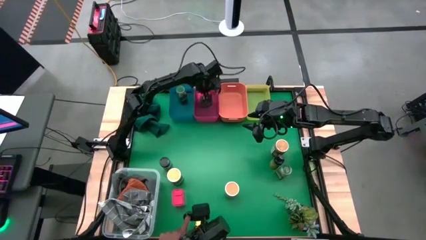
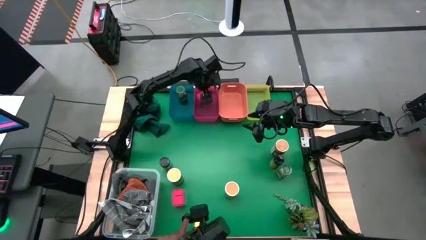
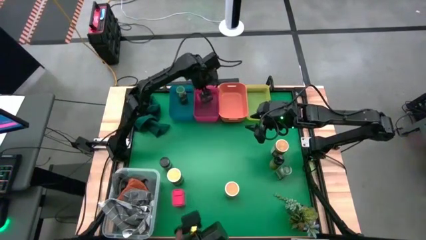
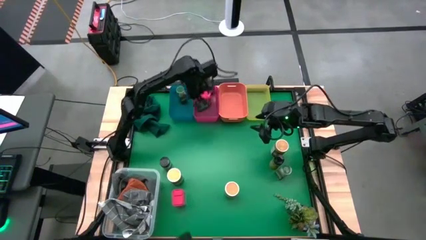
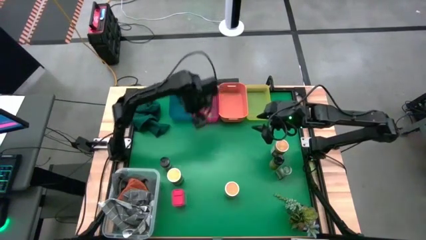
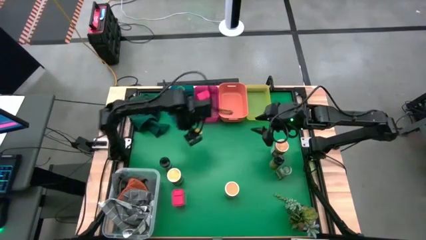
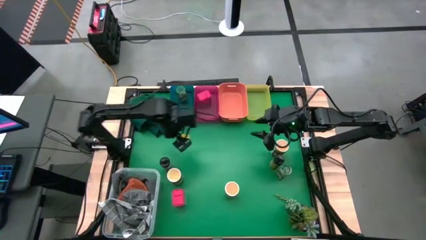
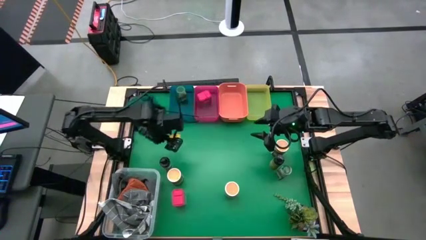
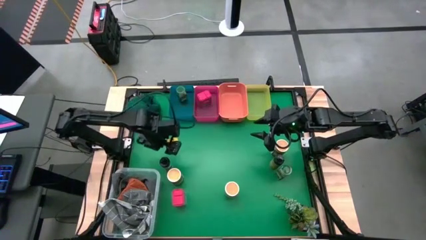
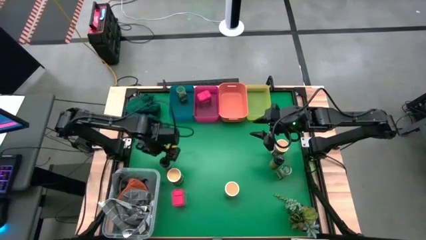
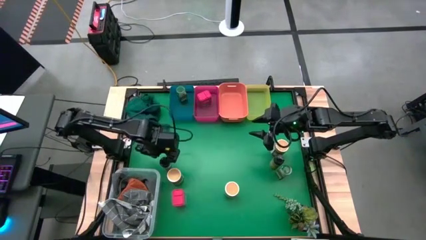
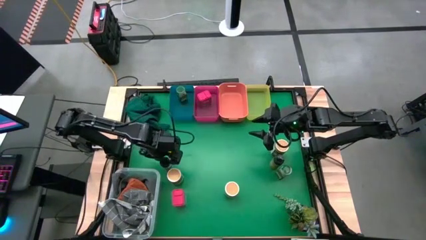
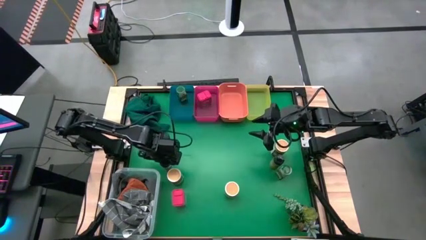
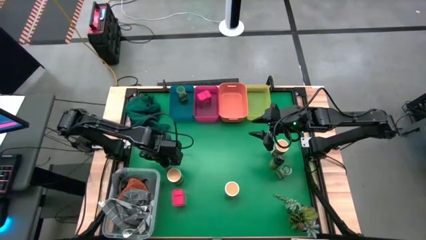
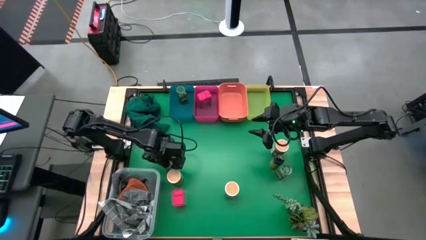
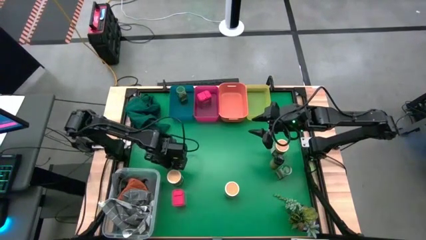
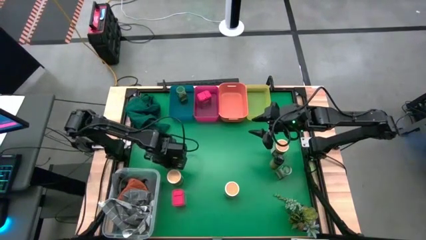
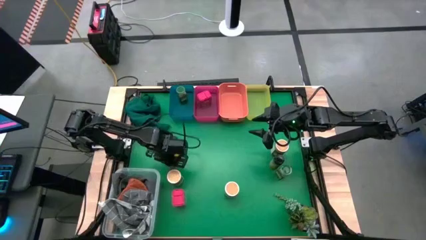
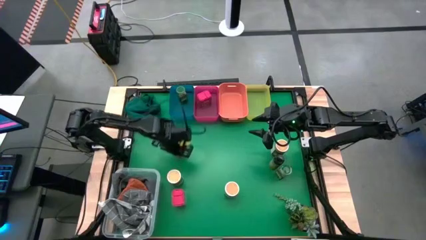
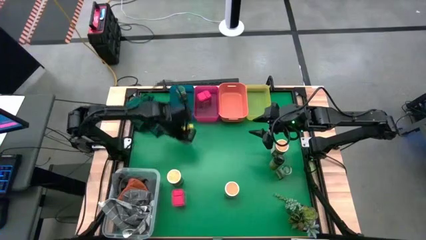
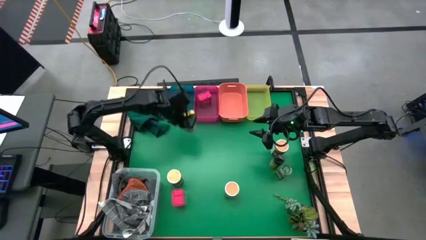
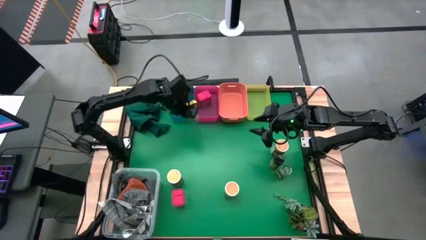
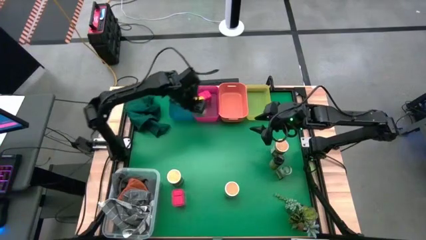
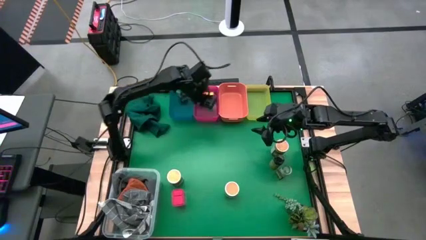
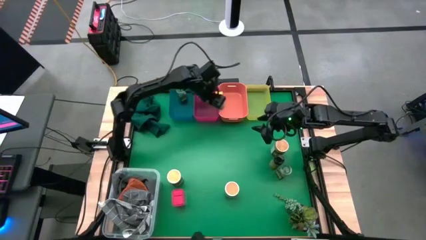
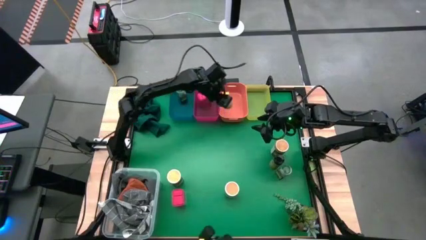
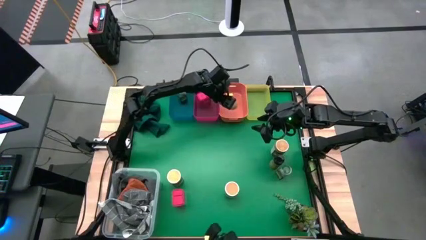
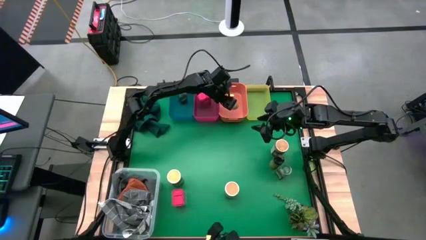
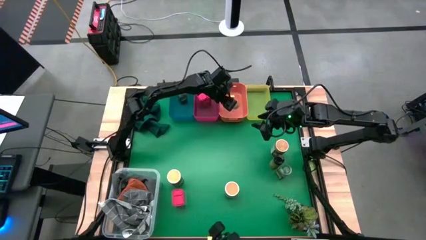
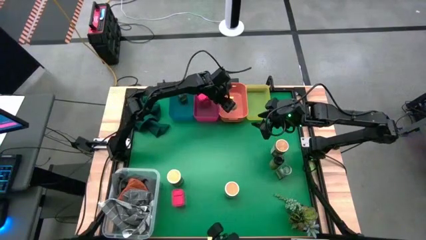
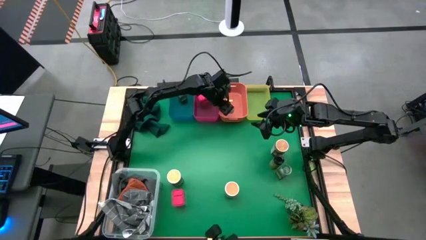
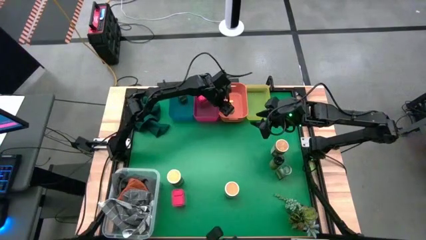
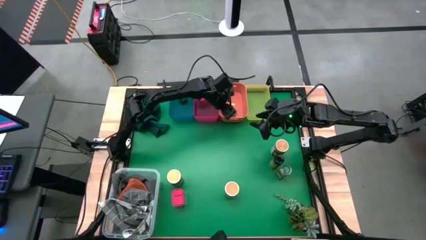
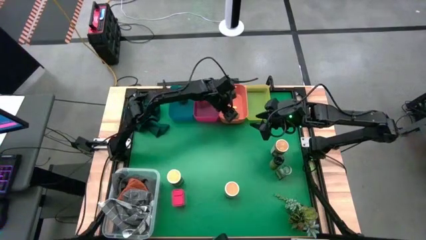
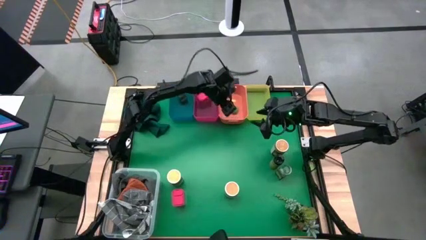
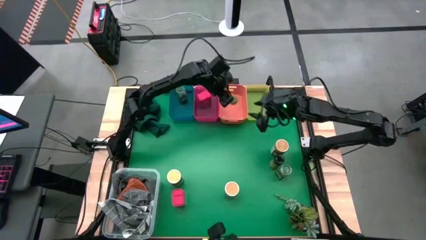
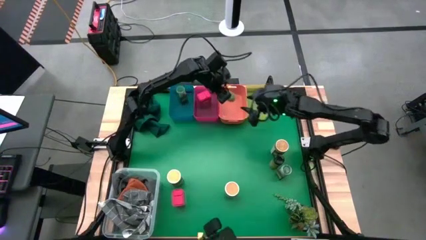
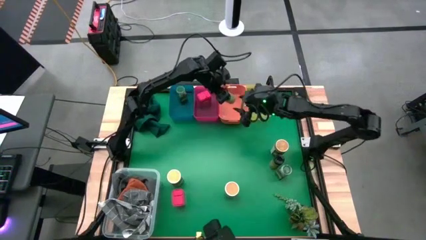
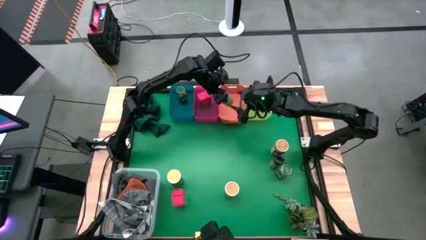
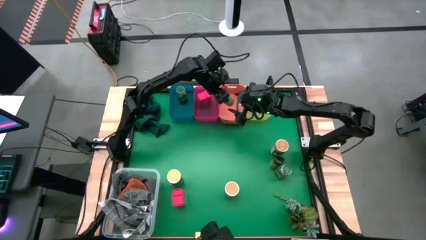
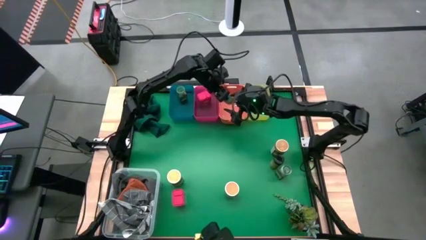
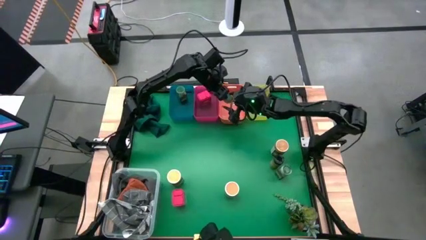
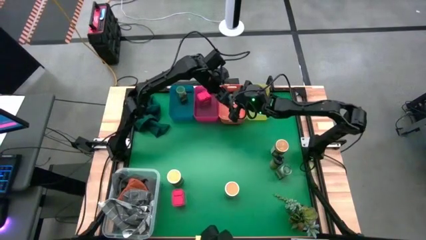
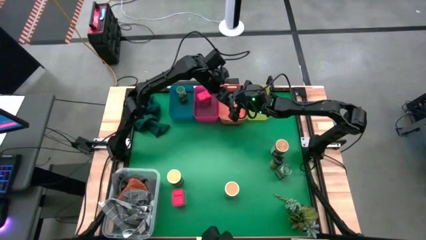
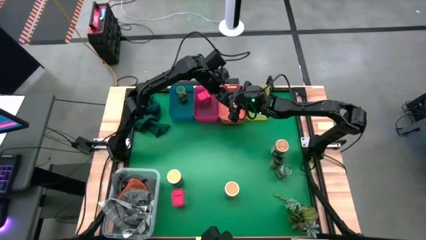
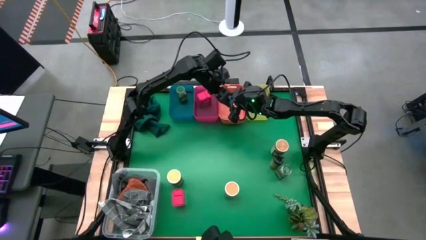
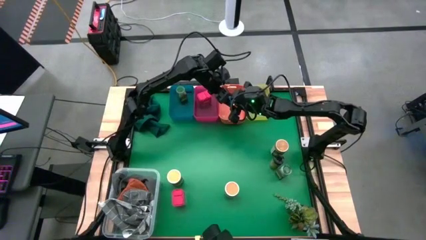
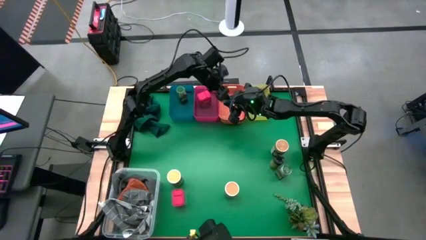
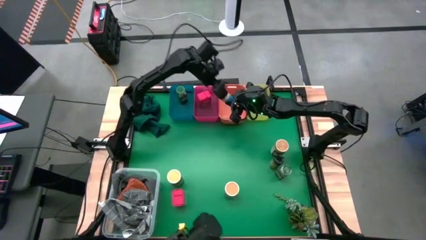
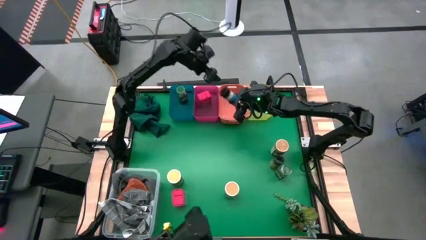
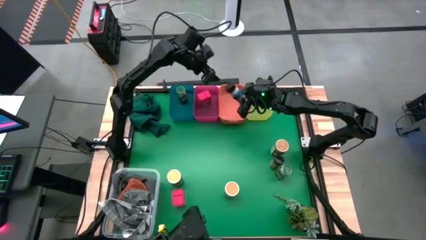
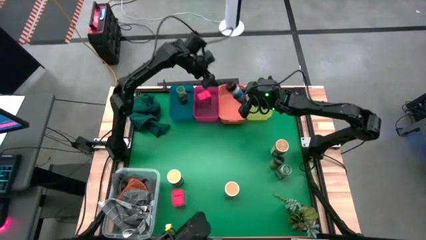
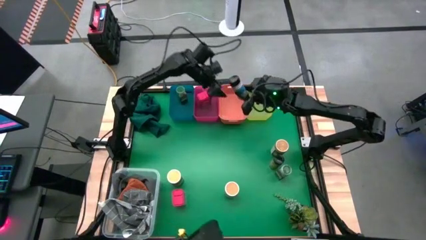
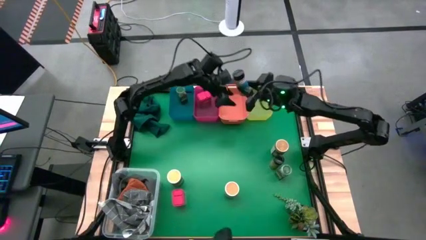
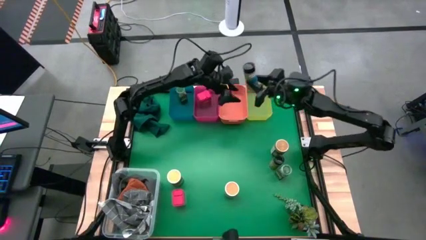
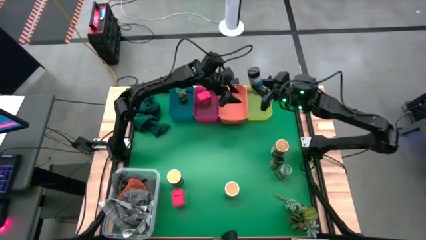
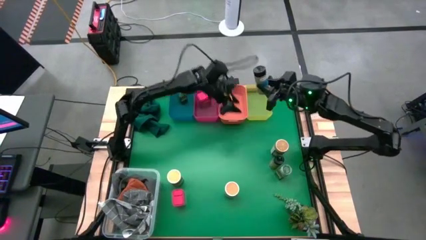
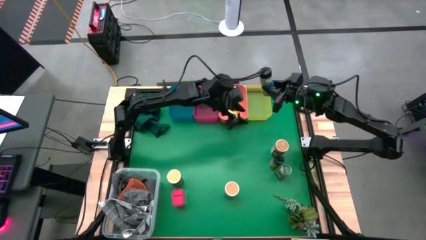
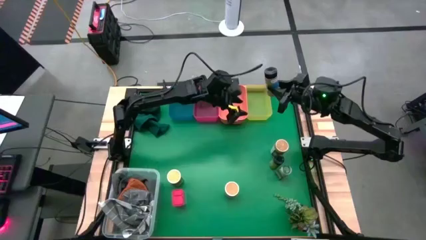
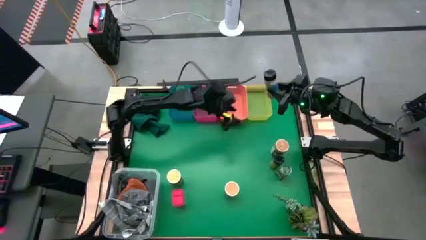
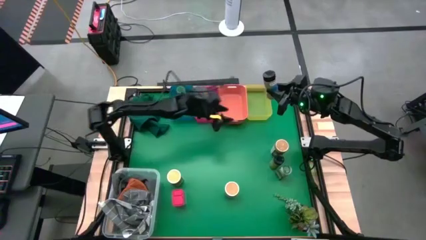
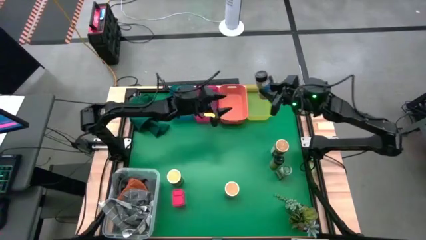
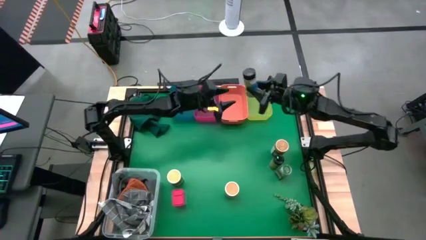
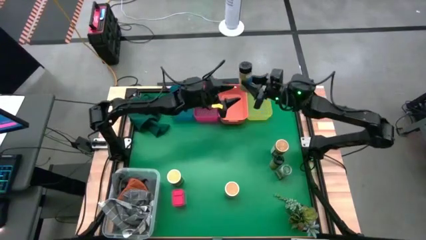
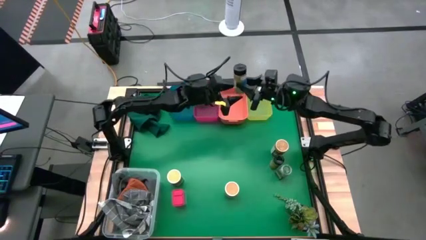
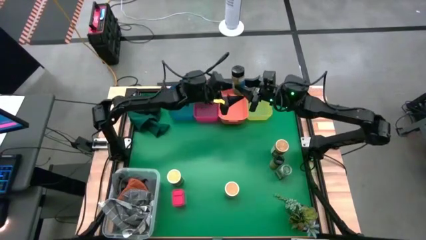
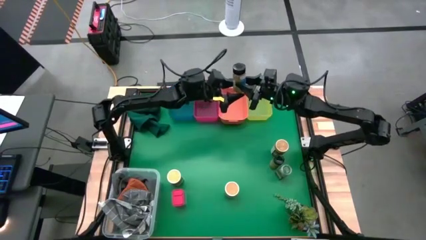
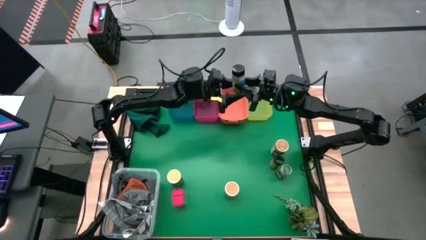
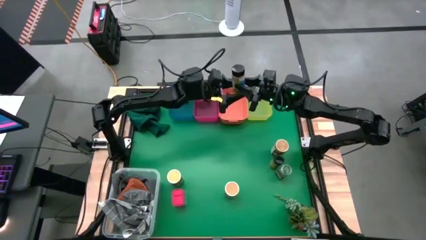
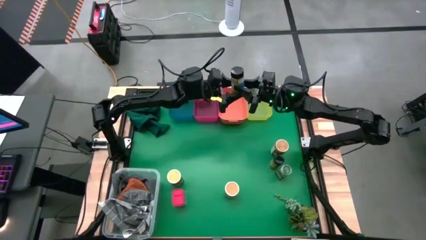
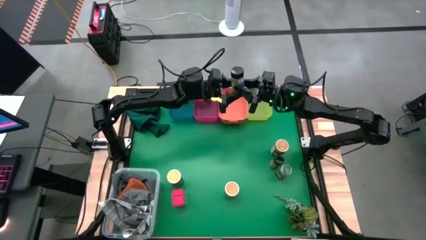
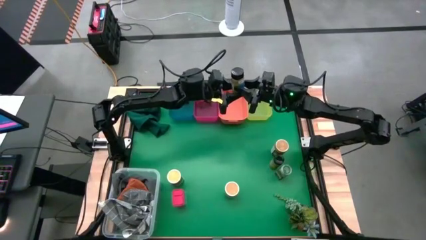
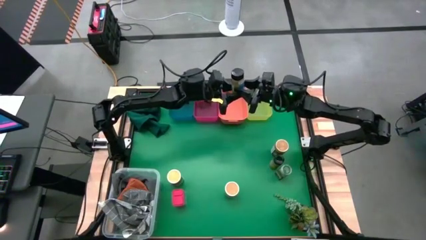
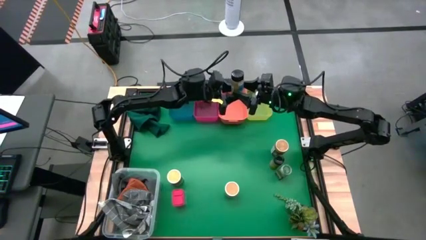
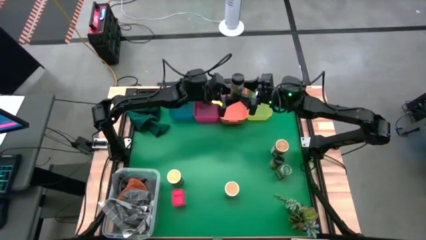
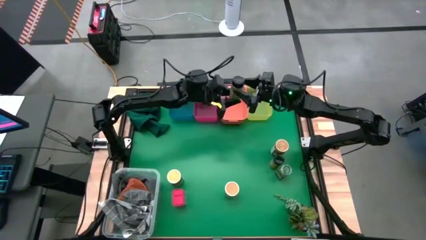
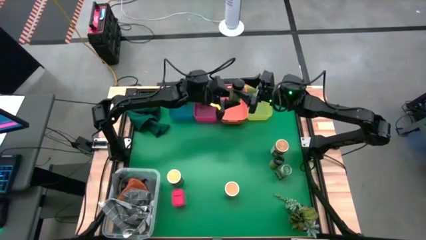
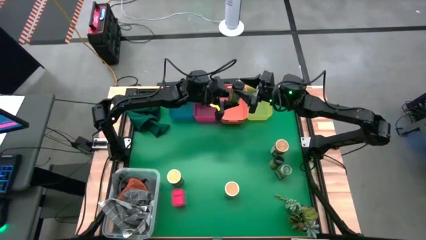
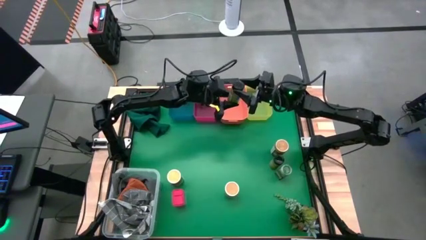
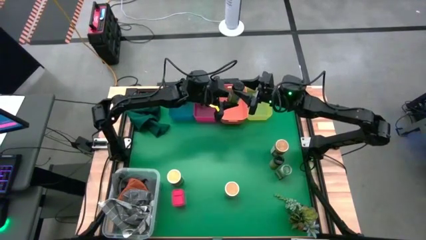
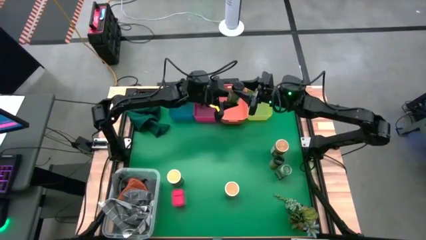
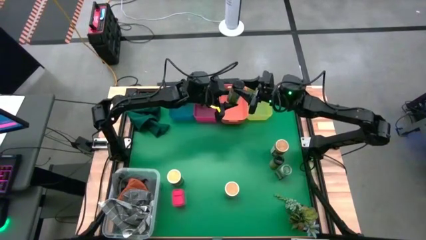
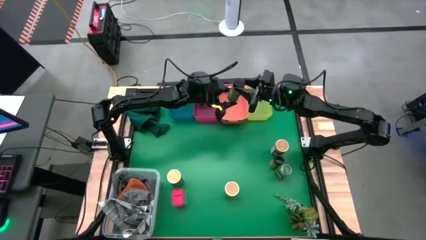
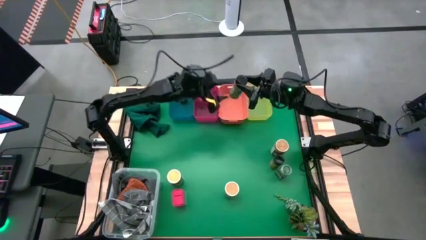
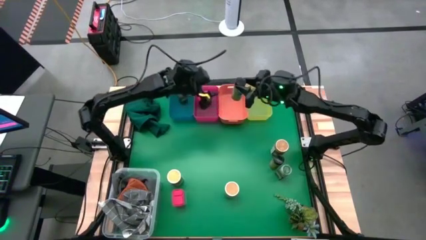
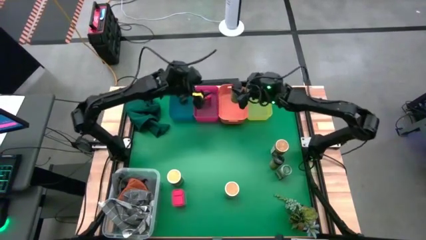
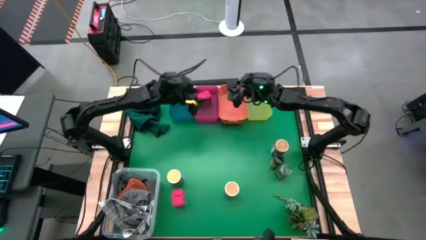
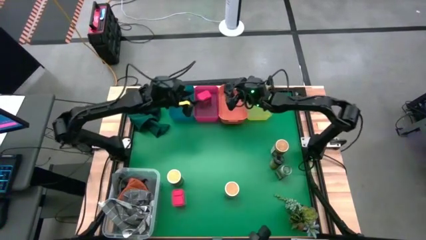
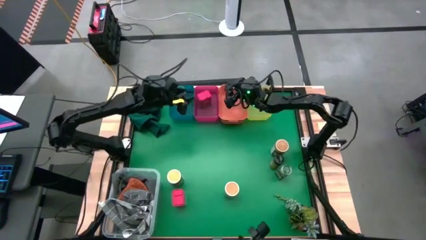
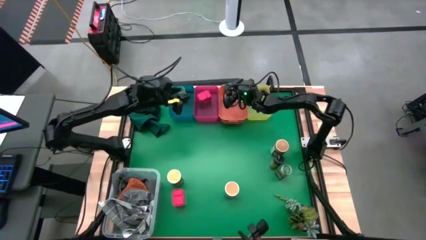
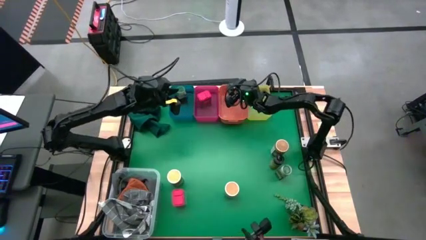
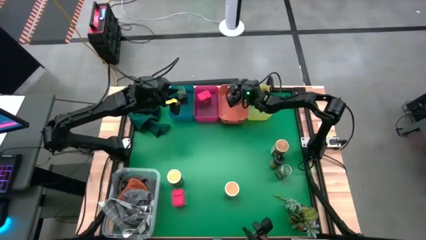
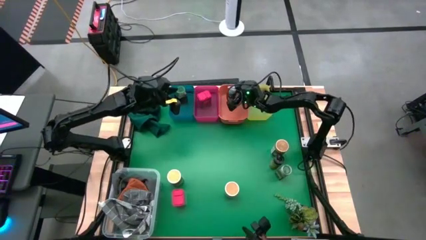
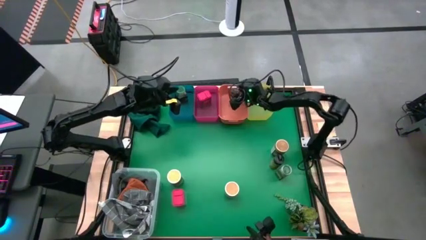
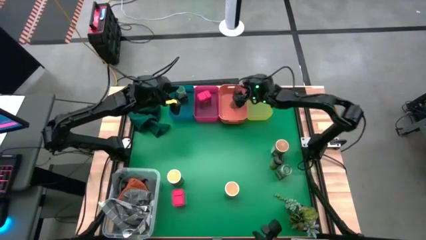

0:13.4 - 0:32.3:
Task: Sort spices by type
Put the left black spice bottle into the orange bin
